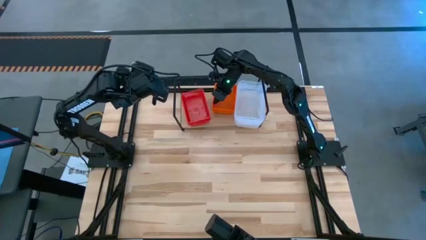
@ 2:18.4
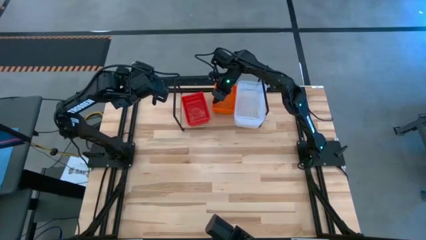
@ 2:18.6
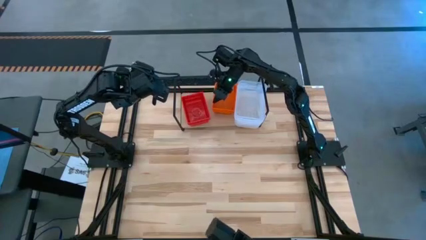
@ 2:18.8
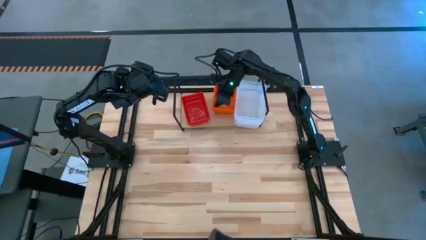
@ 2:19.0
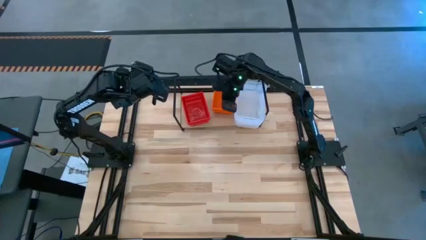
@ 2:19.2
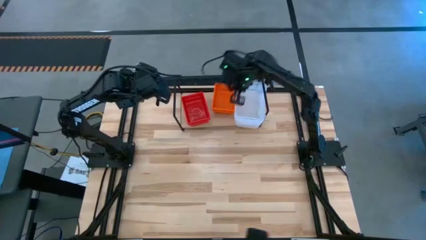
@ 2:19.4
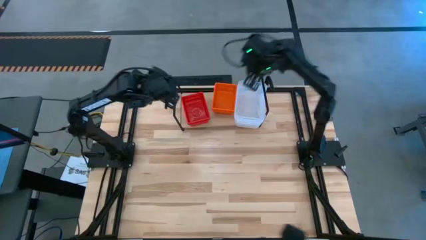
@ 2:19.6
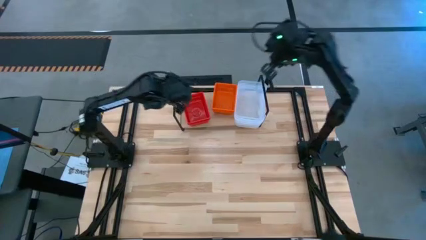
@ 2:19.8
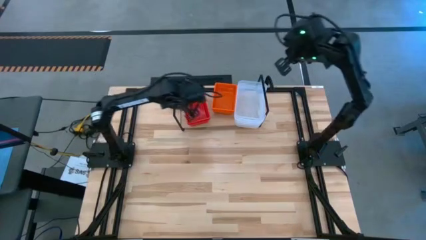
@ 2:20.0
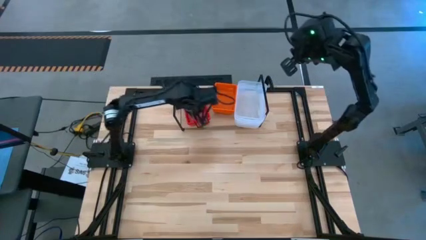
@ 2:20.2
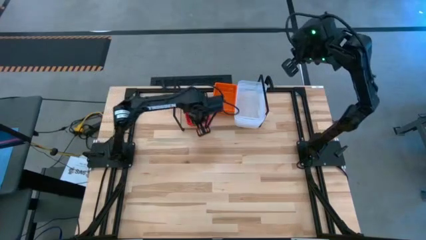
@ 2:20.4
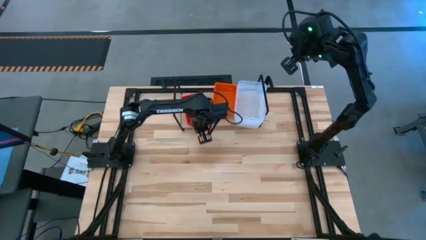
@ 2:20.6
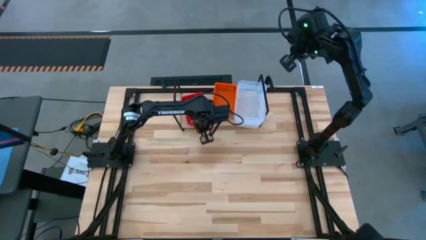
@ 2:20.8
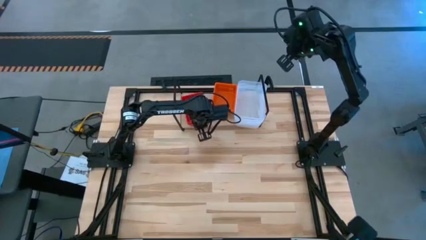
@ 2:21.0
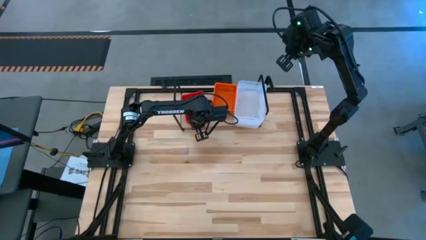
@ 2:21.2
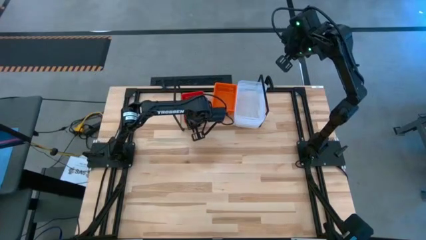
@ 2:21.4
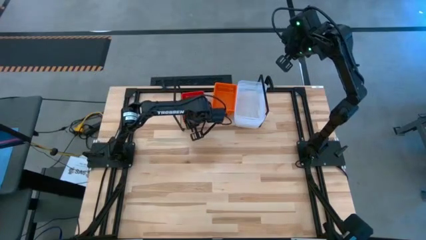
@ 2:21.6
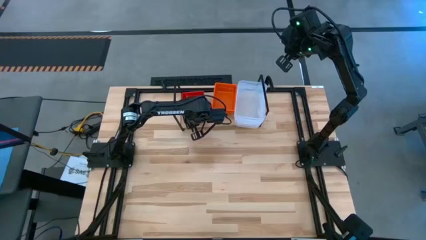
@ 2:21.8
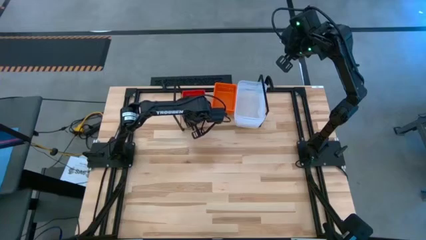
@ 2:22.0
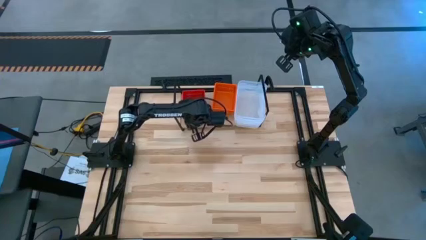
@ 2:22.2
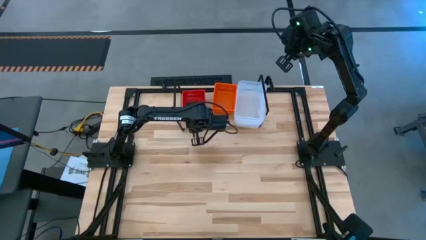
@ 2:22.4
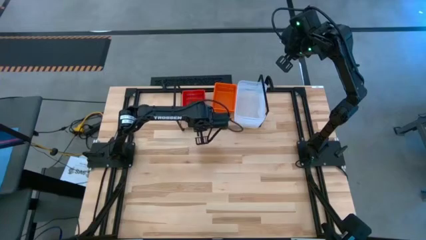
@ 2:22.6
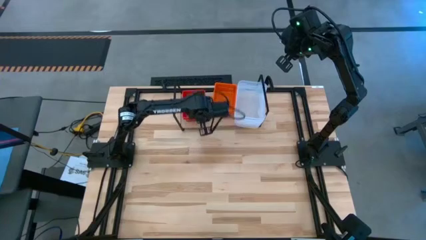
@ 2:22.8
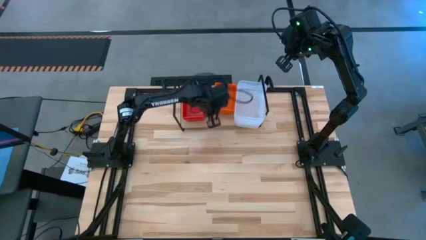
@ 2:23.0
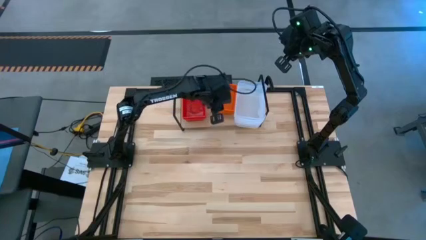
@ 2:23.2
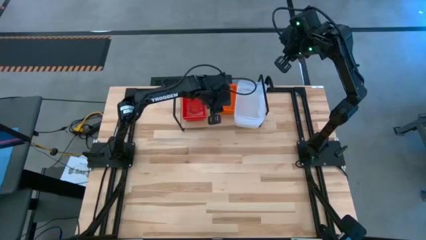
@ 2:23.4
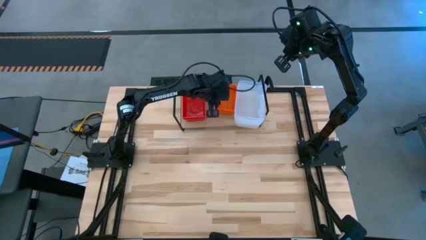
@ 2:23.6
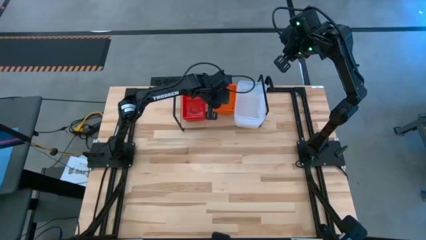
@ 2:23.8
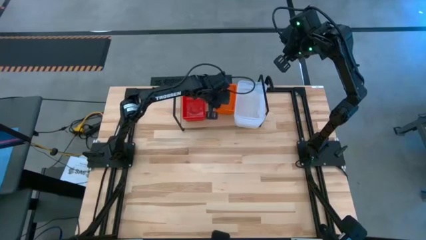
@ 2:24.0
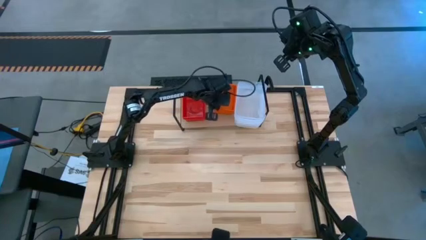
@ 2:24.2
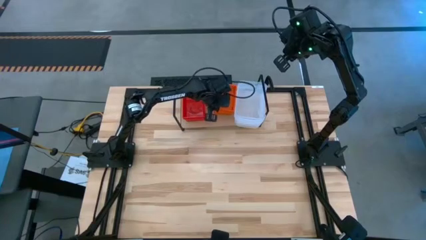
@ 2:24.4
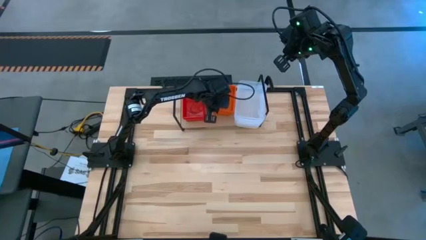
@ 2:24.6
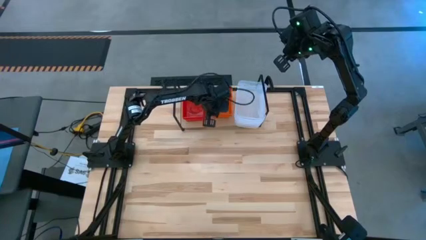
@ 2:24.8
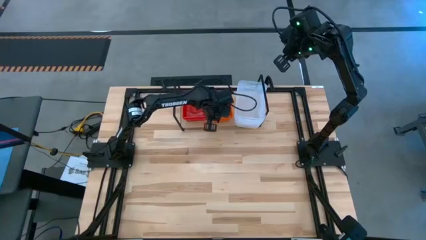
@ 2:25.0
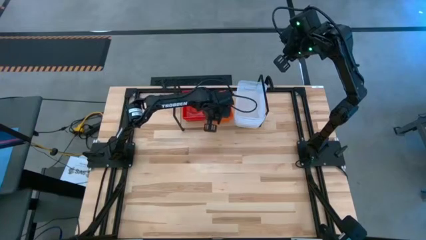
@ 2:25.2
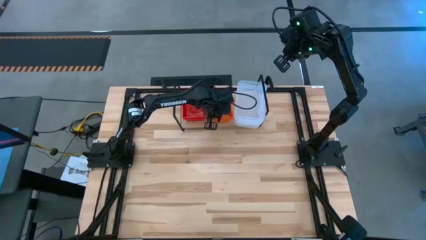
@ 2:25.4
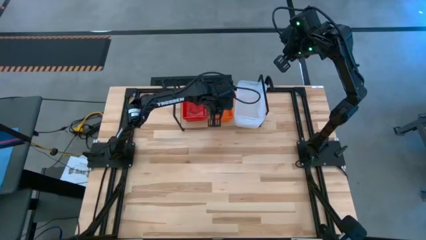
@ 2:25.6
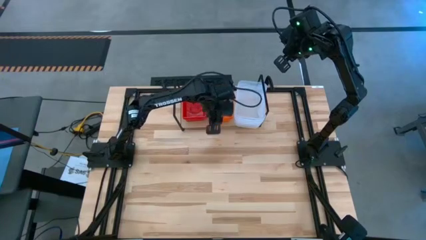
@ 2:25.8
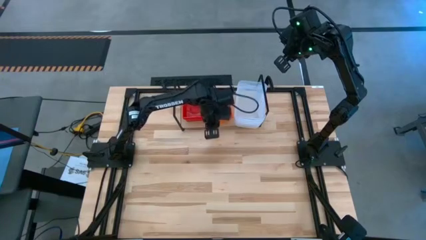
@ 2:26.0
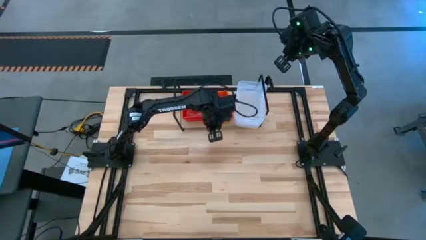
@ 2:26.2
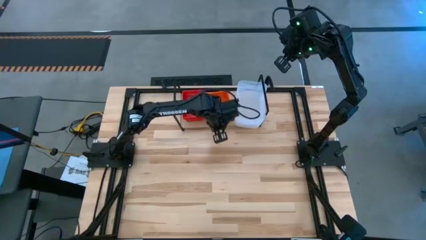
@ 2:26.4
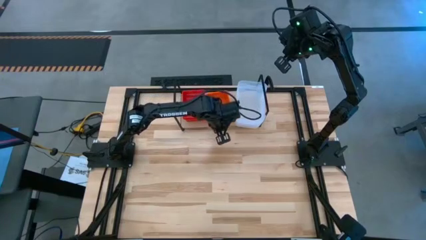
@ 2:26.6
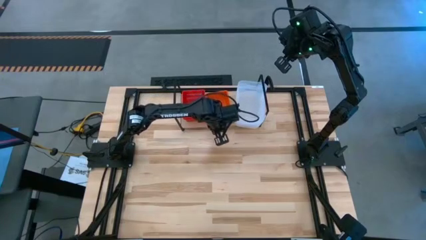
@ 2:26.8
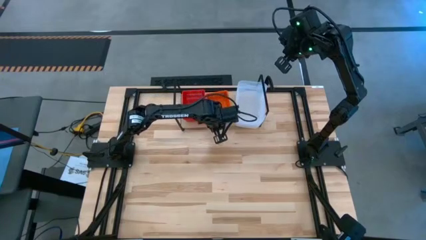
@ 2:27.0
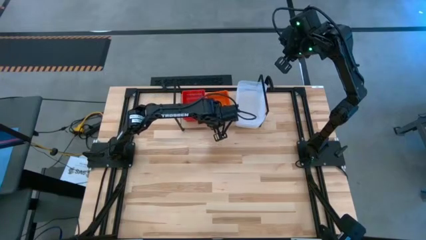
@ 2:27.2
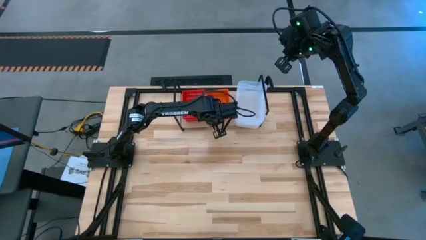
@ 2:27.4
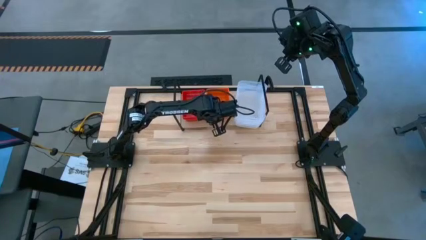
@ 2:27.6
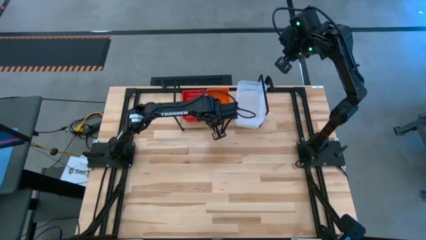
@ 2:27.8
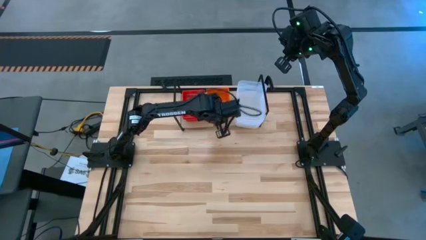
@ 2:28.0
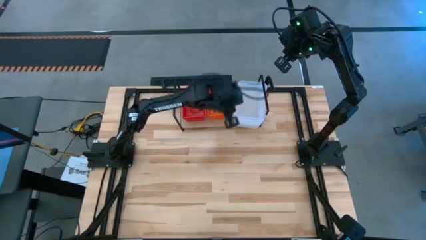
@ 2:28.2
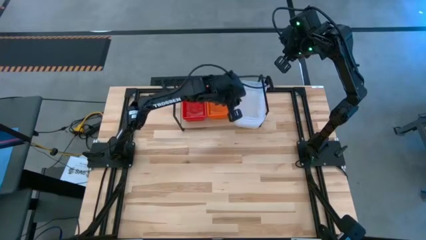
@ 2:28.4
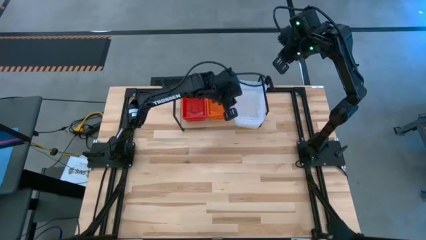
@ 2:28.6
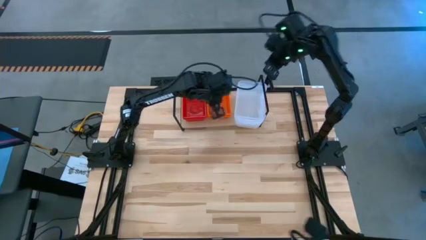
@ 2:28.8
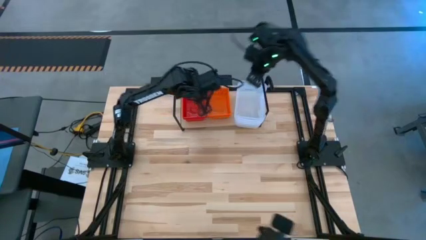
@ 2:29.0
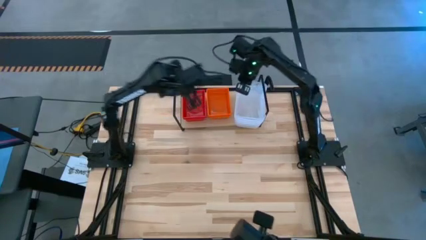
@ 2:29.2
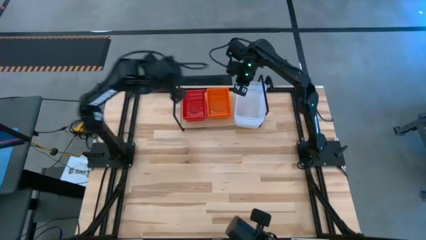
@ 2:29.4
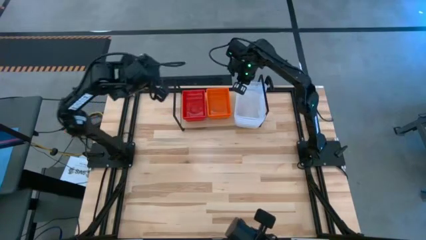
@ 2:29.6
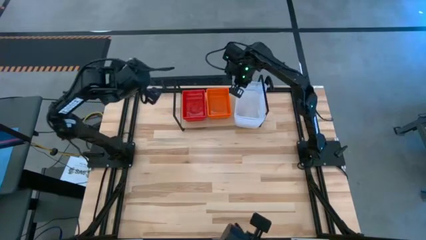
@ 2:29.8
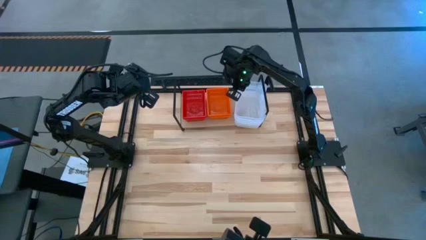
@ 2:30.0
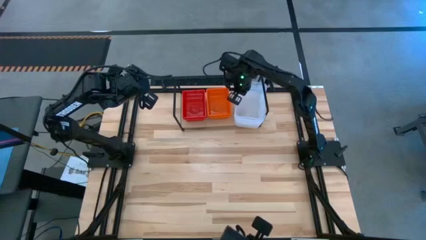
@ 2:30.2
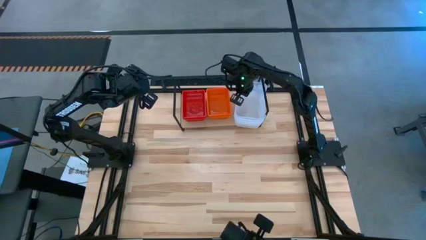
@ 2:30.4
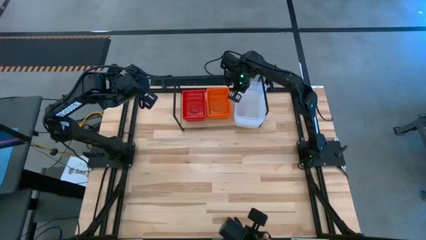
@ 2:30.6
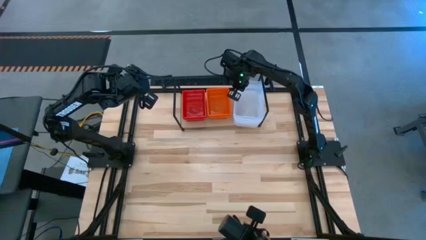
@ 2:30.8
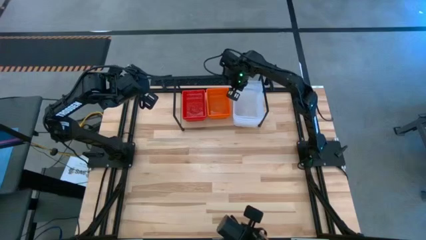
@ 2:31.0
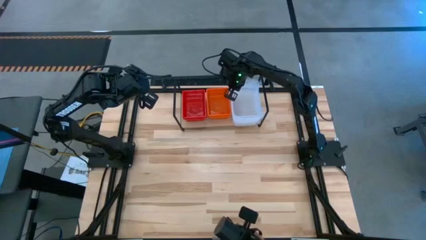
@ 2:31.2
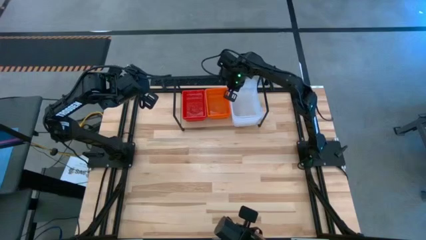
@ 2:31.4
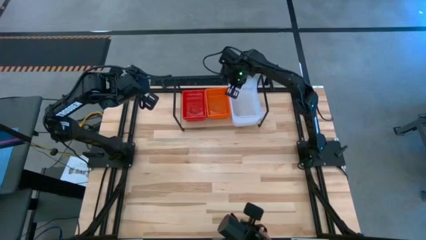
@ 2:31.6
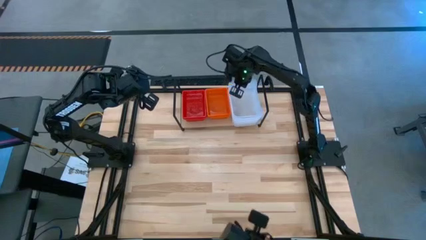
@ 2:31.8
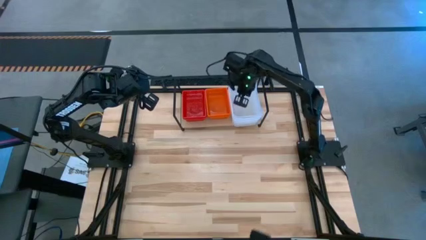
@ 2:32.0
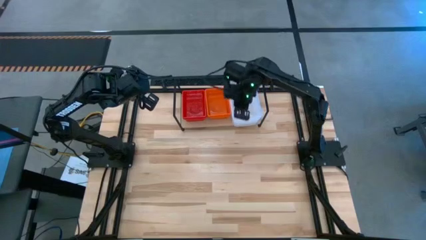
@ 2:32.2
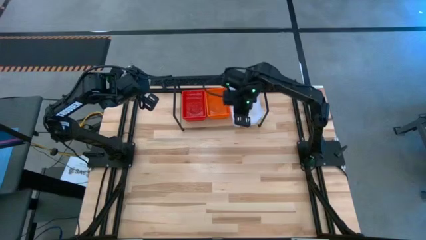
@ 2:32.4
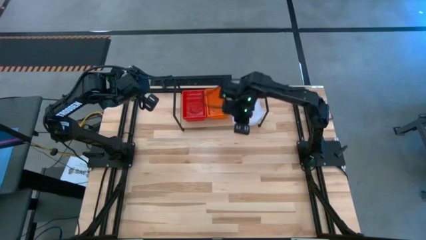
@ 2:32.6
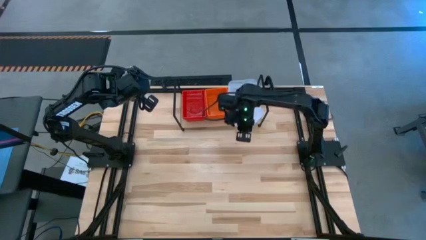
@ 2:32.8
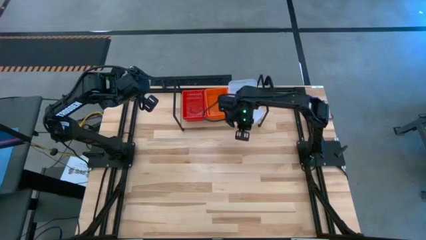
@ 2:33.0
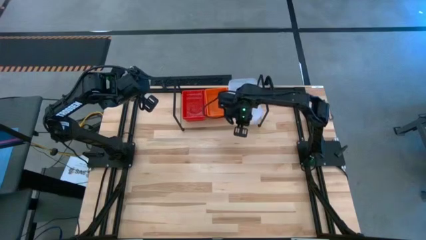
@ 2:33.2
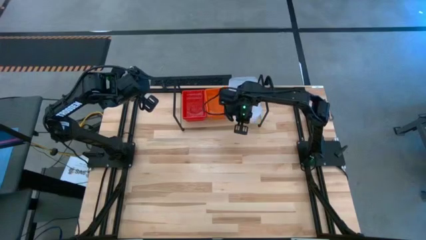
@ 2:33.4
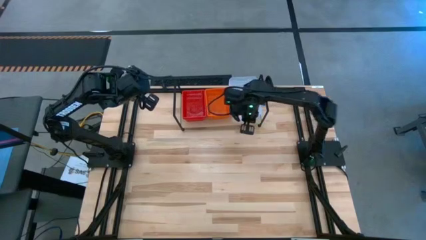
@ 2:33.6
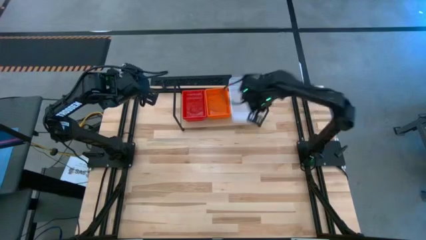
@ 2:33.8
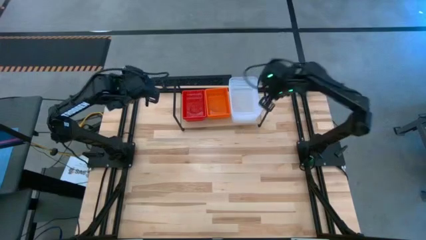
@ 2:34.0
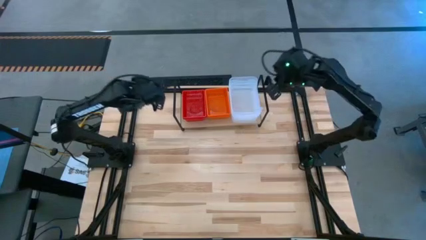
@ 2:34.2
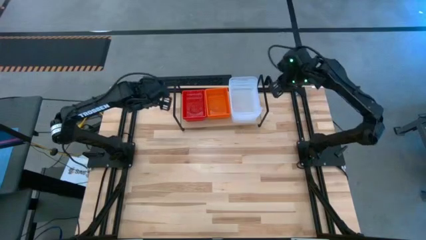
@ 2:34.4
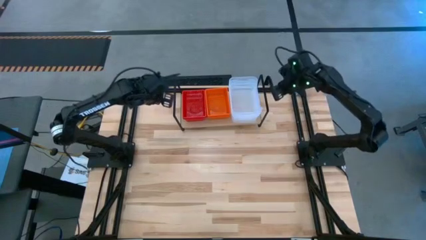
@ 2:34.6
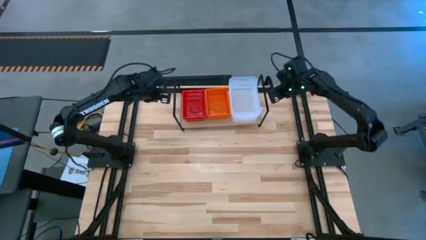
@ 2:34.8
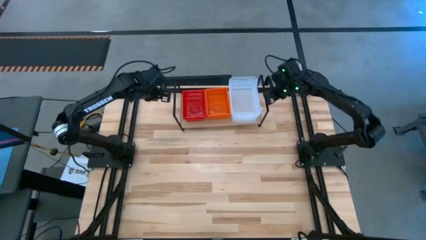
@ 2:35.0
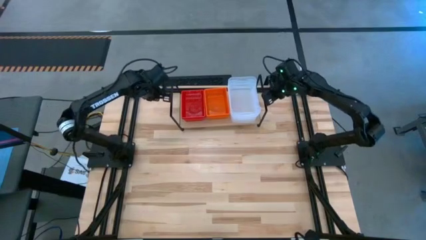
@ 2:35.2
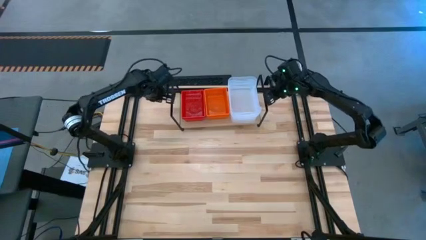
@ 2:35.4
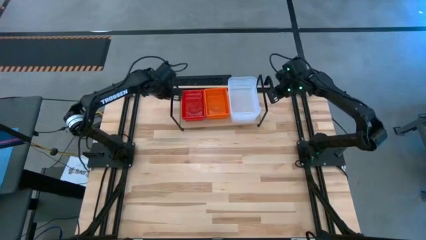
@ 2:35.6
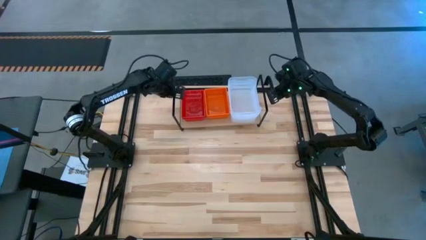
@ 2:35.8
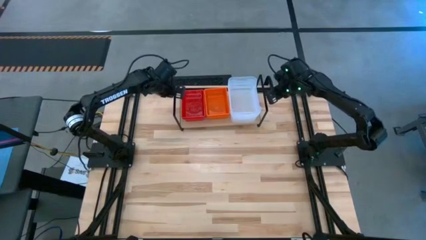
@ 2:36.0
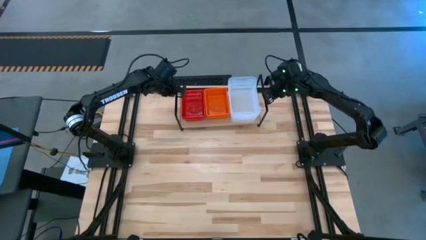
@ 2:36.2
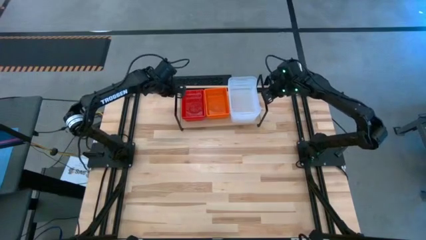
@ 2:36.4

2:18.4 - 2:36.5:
Task: Stack baskets on shelf by color
Adjust the bins on the shelf
